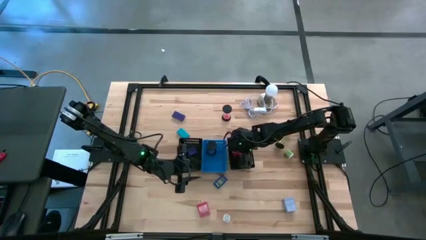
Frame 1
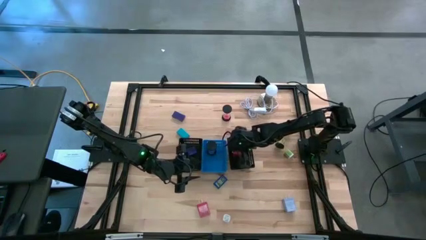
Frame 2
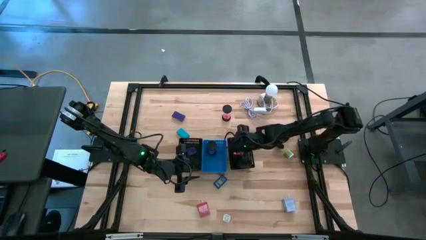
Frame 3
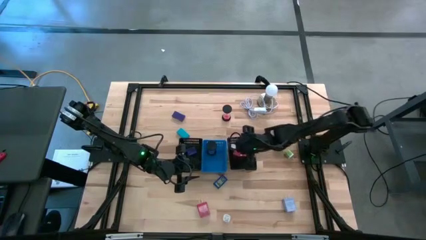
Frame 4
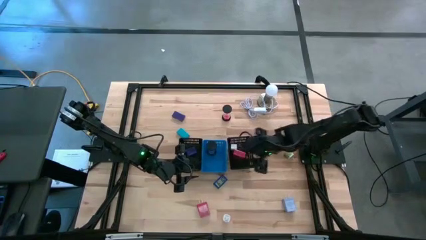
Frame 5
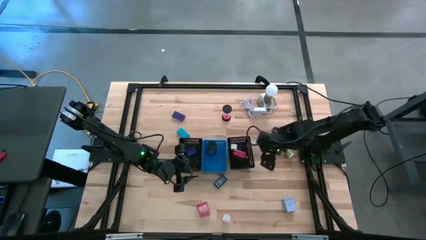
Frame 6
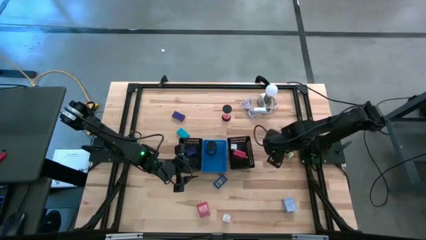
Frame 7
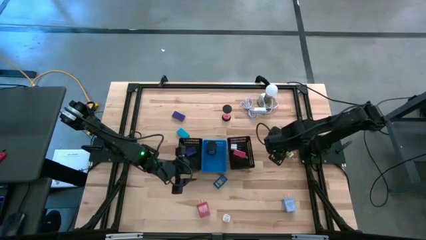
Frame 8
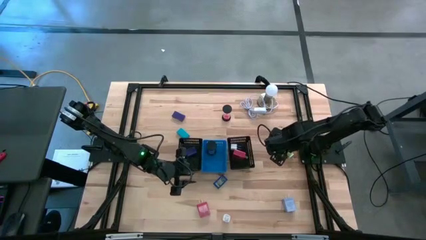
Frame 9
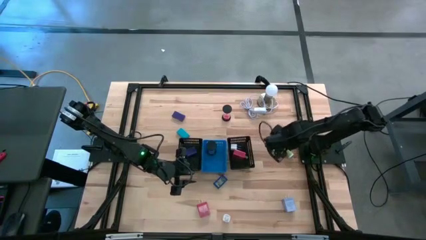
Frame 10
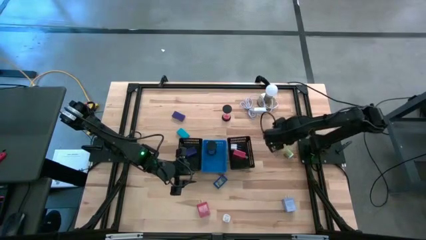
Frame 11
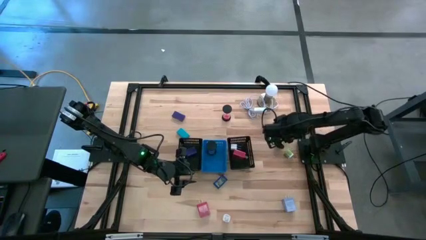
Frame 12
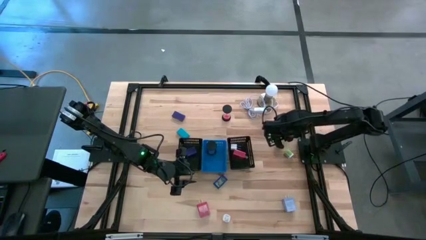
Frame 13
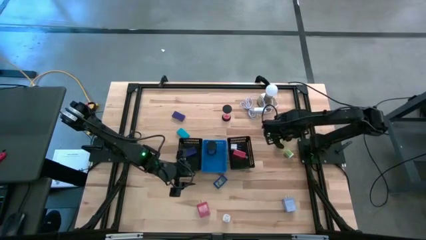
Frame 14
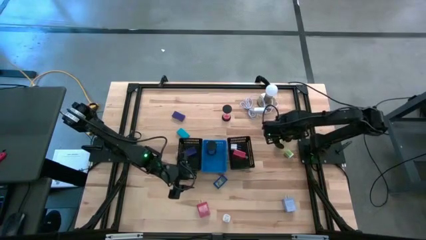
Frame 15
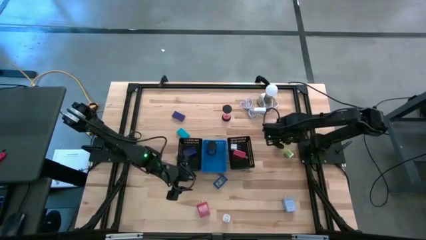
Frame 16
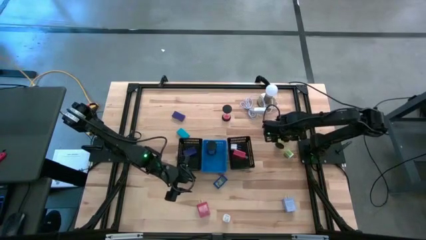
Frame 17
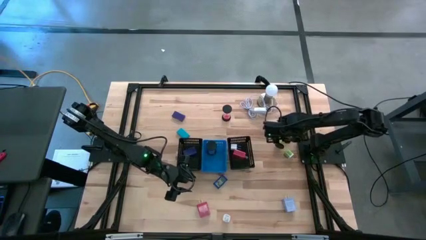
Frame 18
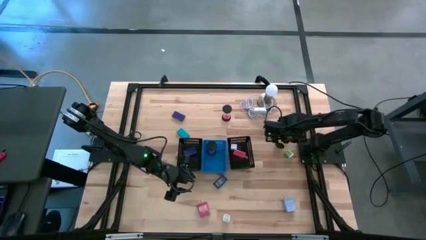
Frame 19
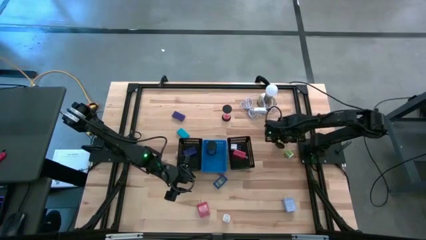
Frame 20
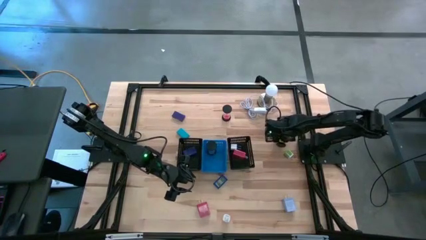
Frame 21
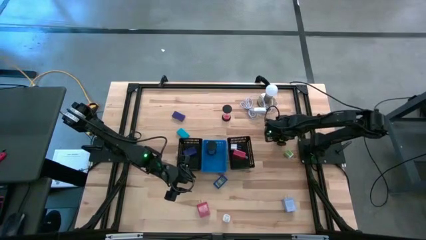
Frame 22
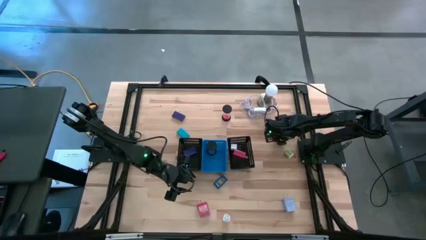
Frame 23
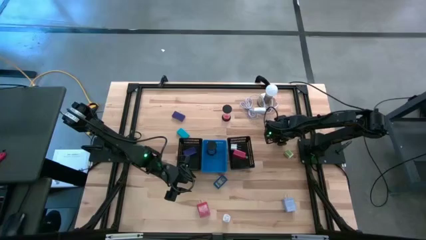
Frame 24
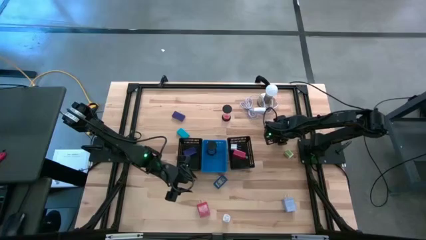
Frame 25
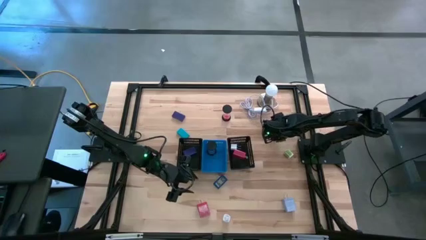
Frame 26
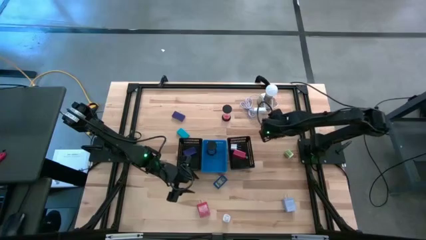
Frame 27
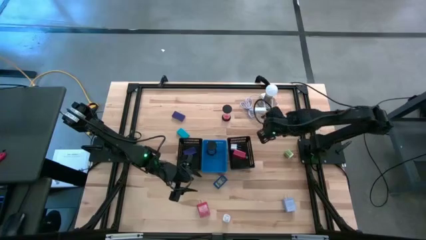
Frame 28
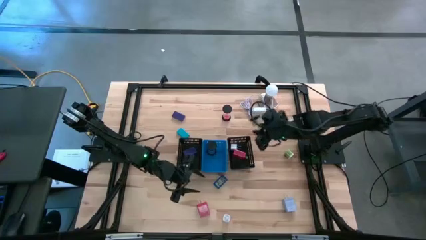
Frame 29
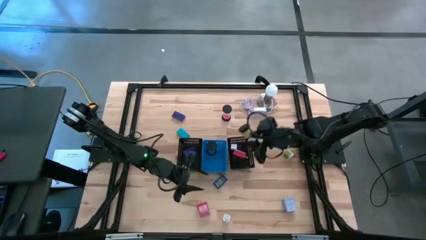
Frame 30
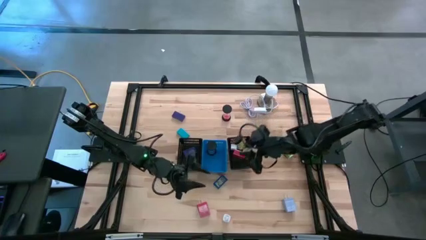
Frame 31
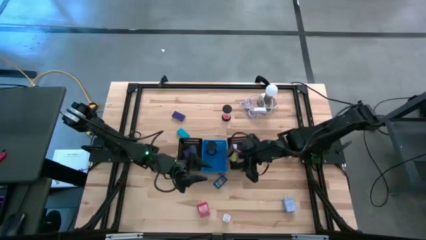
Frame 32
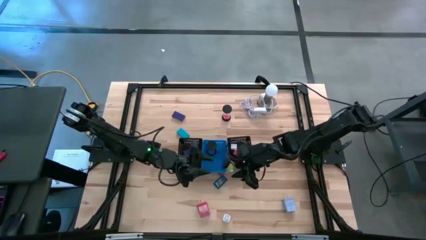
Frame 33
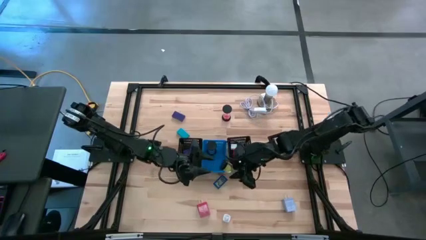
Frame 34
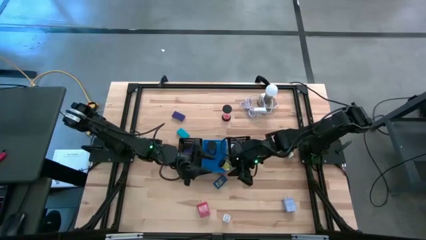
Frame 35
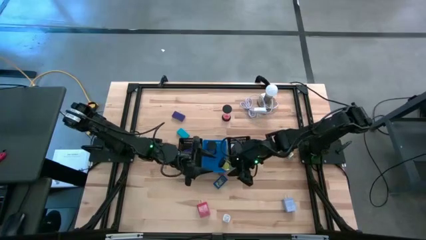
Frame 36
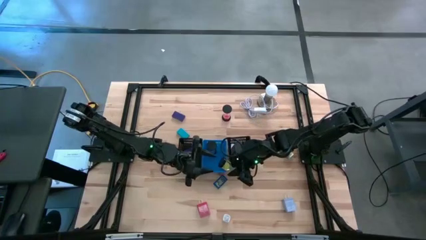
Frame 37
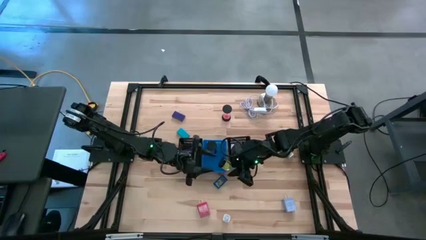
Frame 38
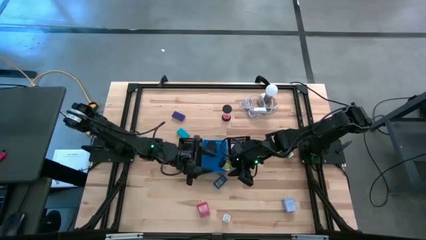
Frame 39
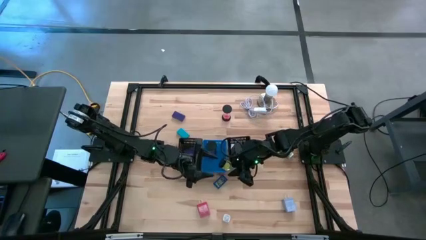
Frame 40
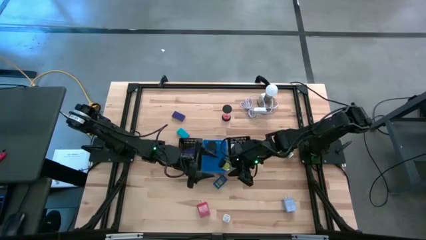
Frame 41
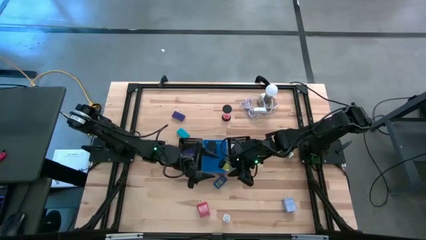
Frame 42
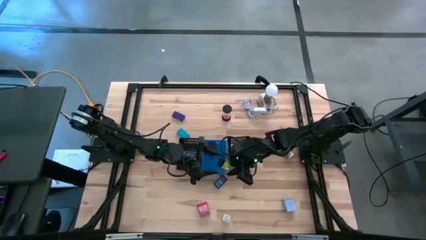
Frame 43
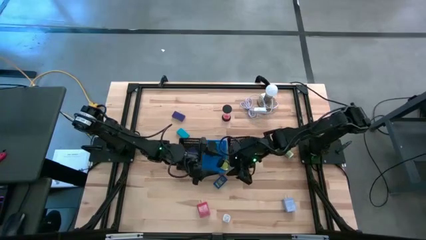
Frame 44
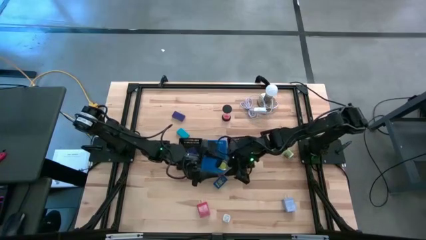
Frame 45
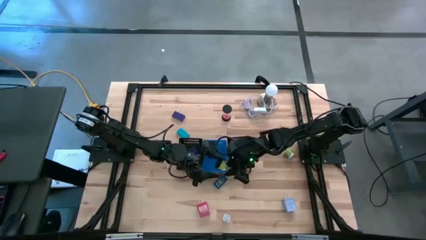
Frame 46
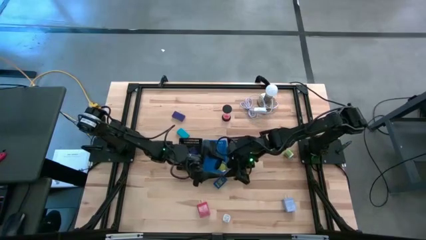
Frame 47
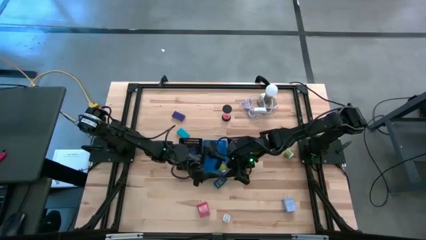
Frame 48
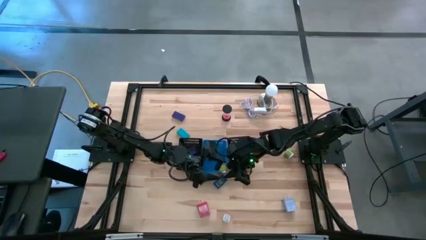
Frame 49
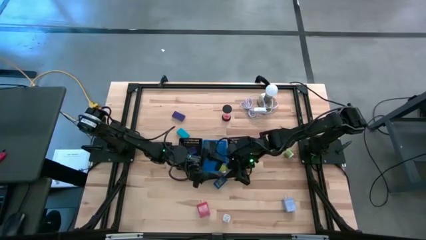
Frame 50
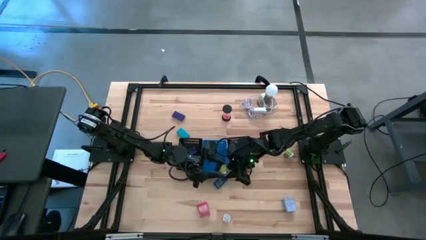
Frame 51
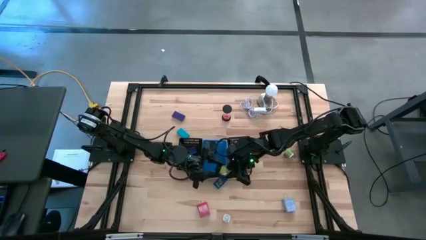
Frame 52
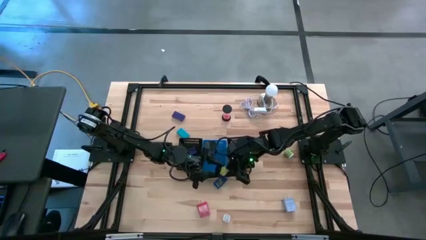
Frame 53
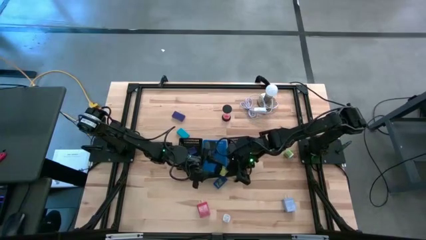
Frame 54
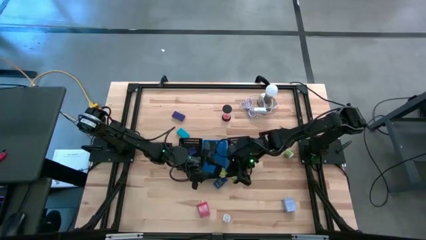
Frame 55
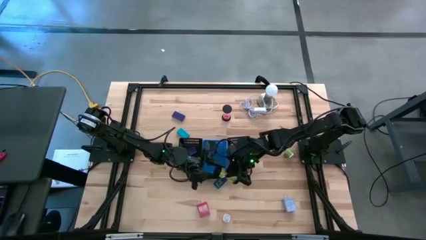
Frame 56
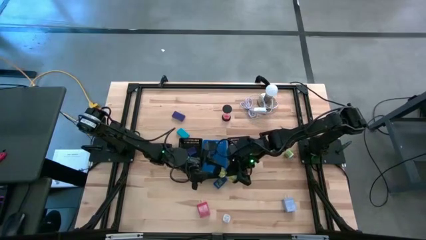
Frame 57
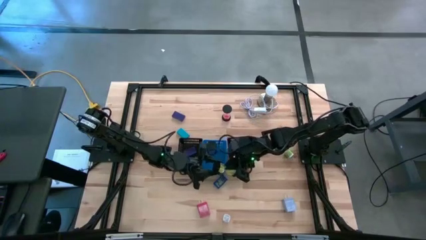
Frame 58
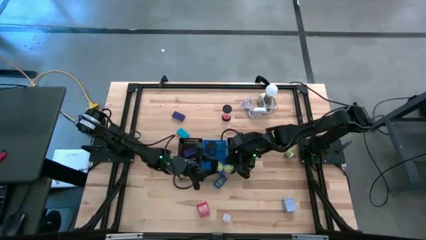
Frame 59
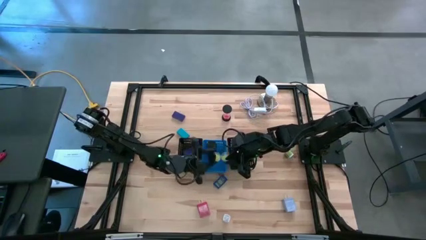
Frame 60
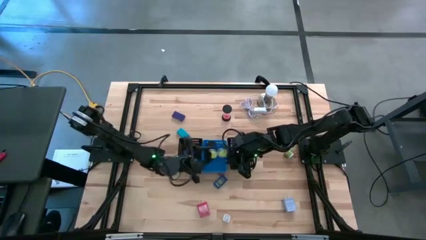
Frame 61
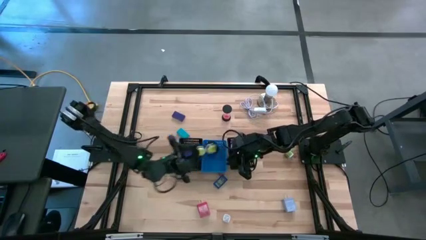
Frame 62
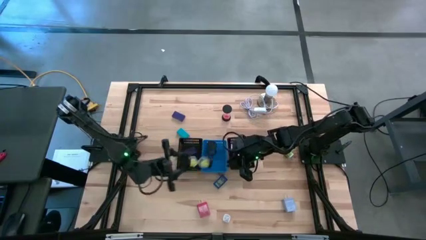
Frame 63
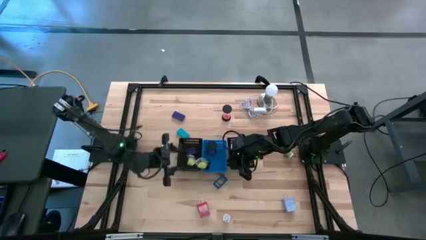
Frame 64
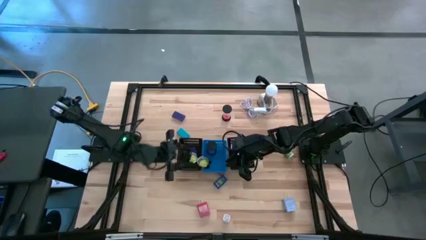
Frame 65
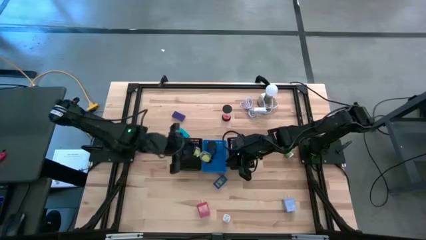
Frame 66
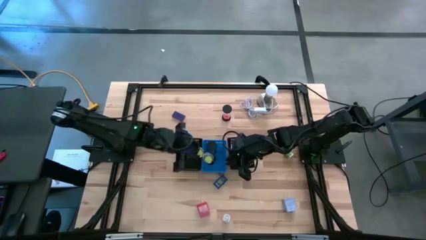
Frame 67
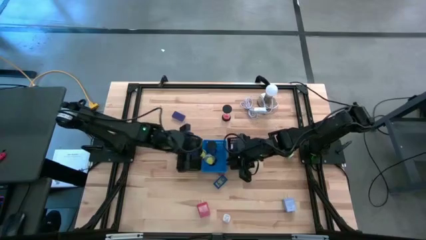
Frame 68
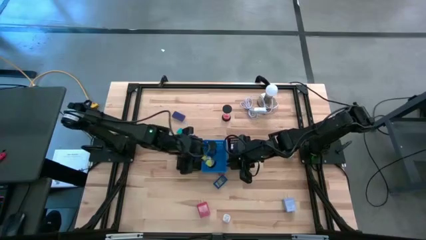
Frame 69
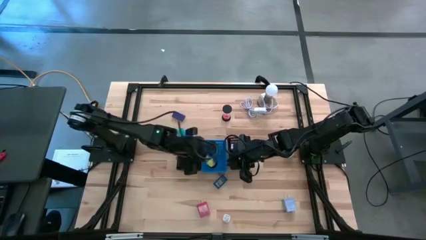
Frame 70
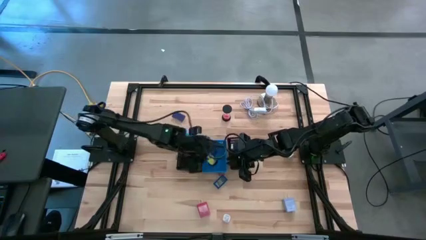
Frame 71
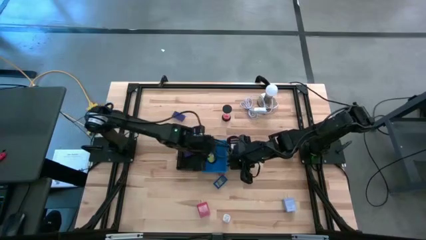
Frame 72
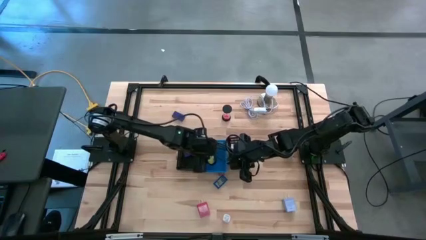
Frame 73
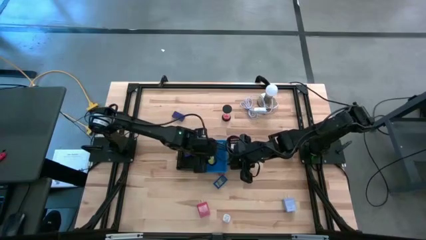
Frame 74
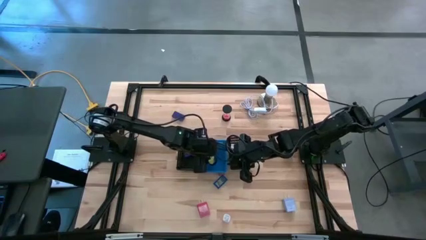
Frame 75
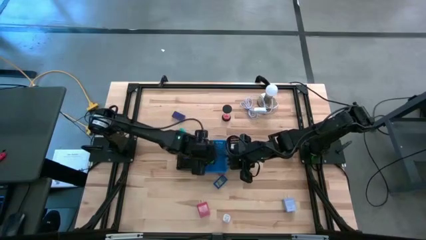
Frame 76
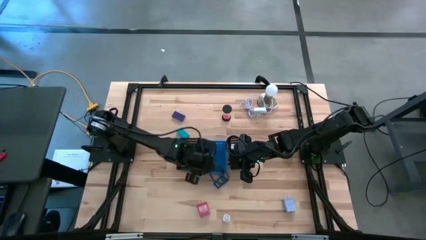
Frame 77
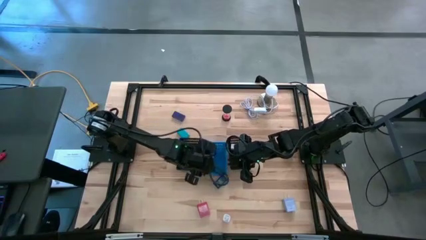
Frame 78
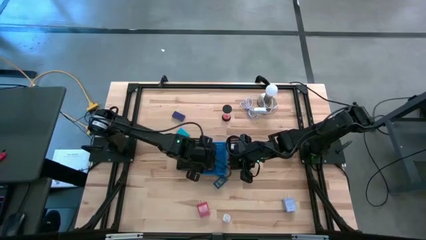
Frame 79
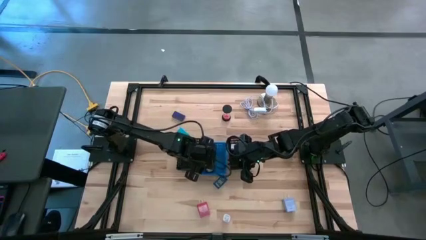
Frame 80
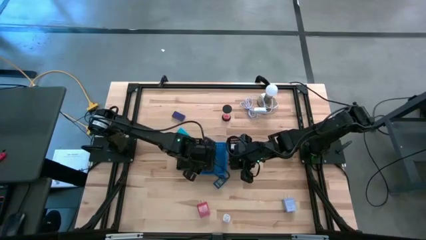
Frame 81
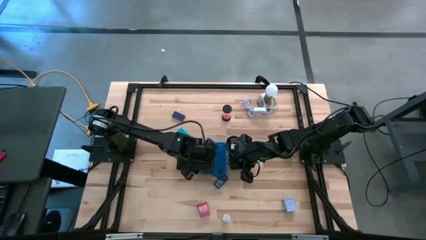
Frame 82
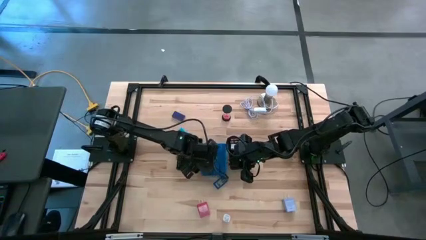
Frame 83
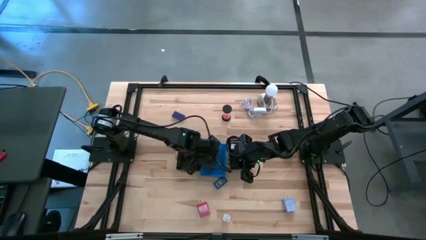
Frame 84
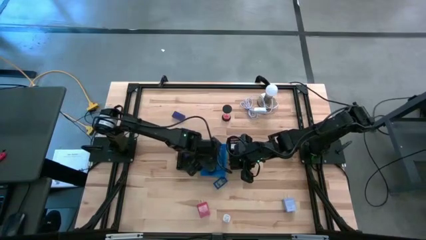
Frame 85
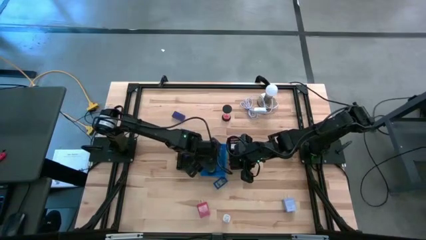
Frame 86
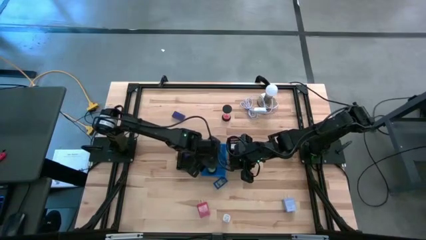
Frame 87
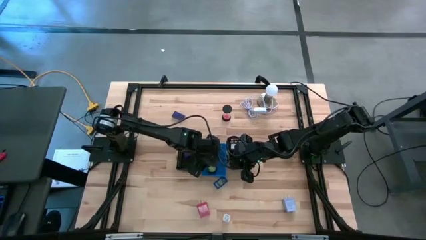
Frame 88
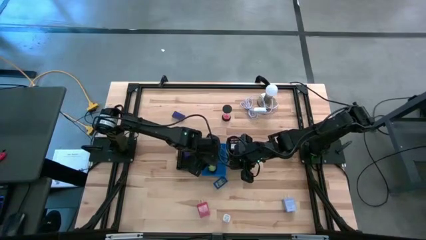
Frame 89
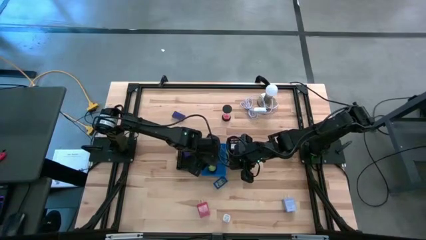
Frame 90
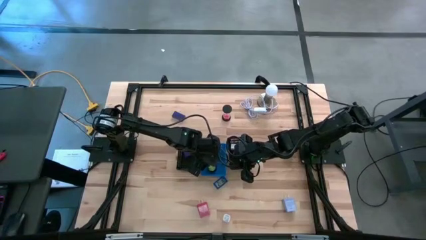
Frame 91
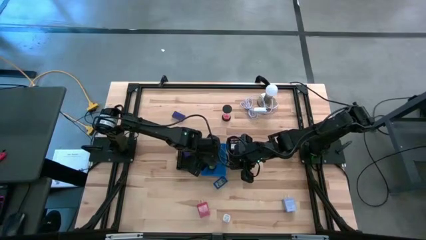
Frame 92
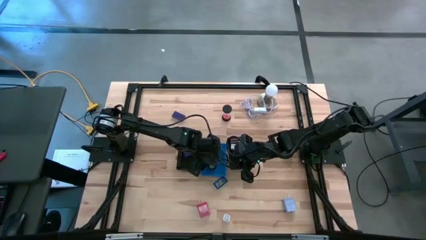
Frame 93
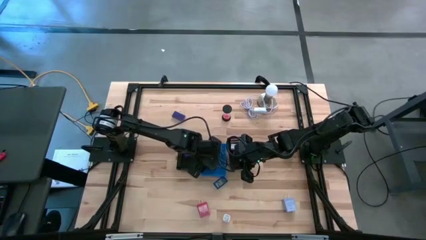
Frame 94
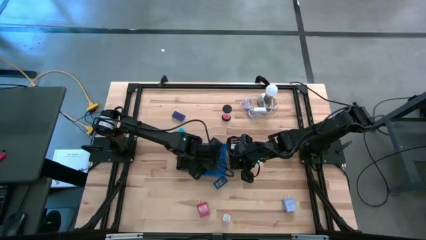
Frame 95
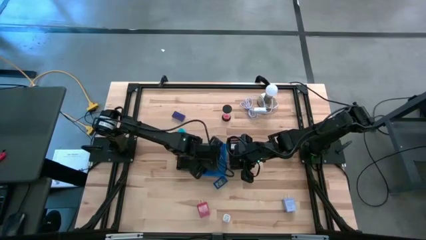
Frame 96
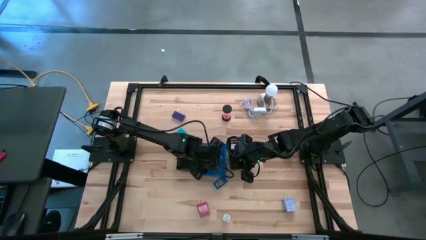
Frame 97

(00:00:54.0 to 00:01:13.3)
Task: Pick & Place Office items
Put the green hourglass into the blue bin
